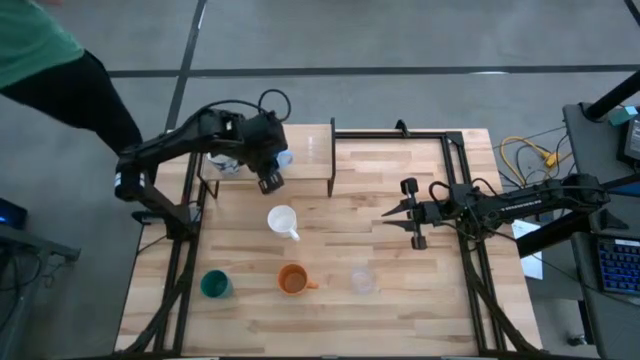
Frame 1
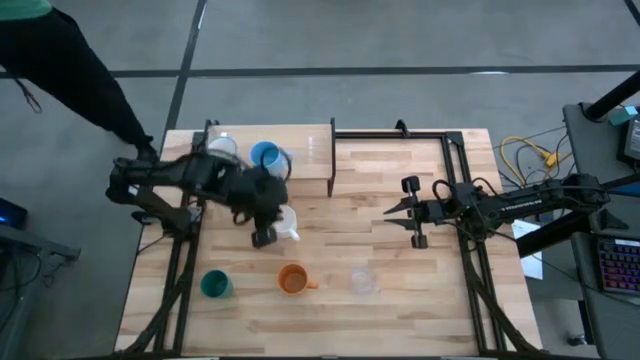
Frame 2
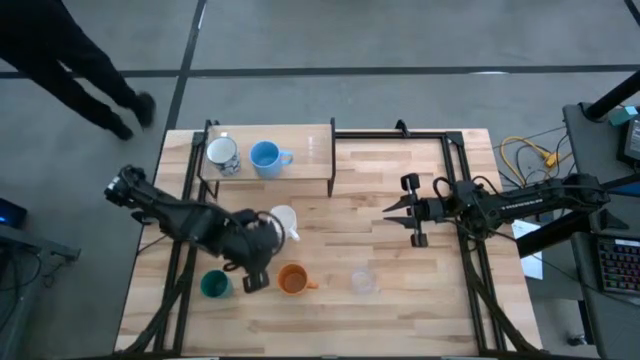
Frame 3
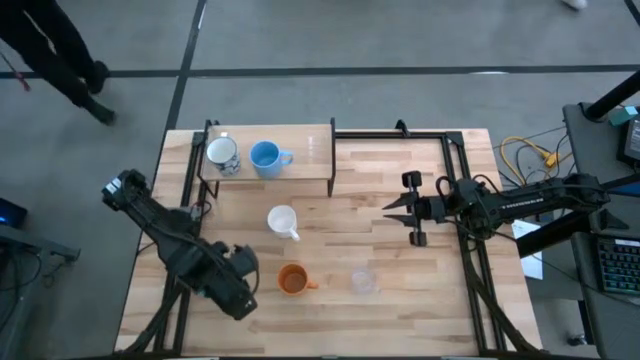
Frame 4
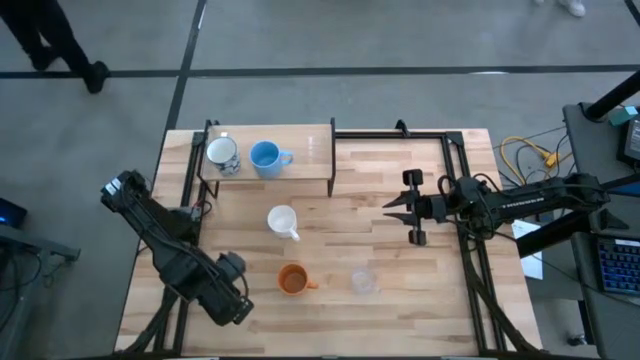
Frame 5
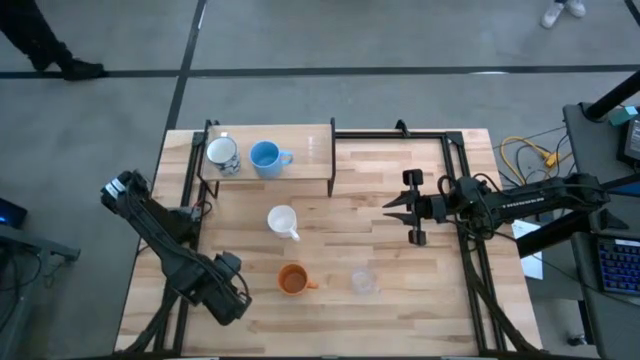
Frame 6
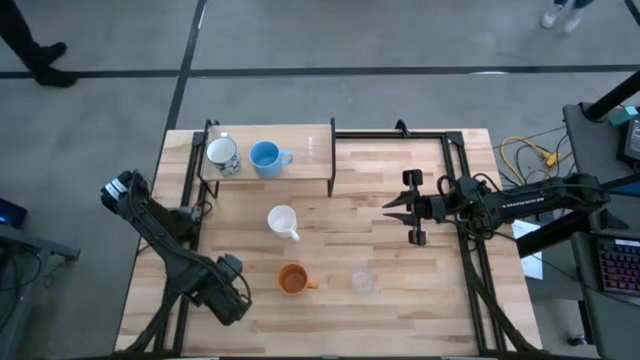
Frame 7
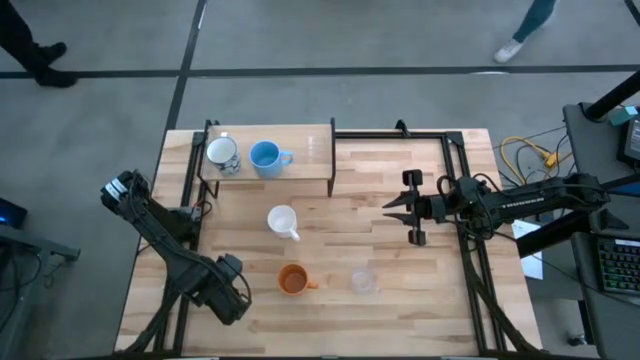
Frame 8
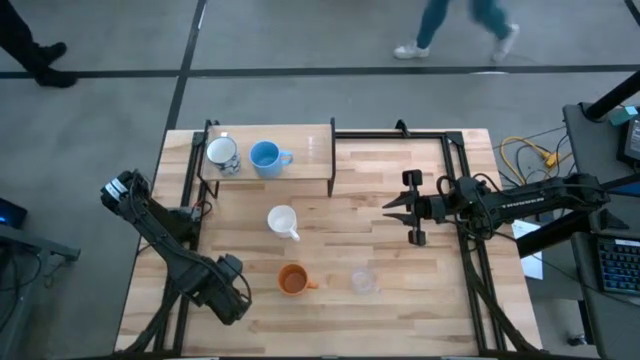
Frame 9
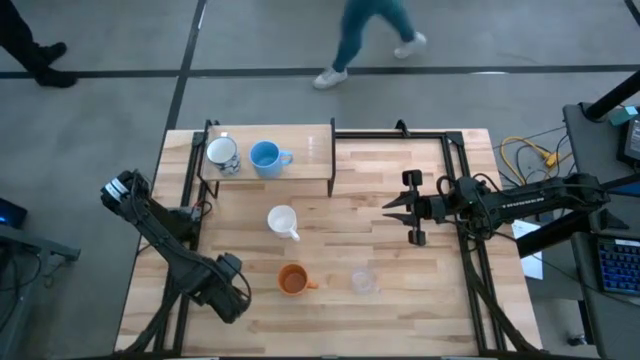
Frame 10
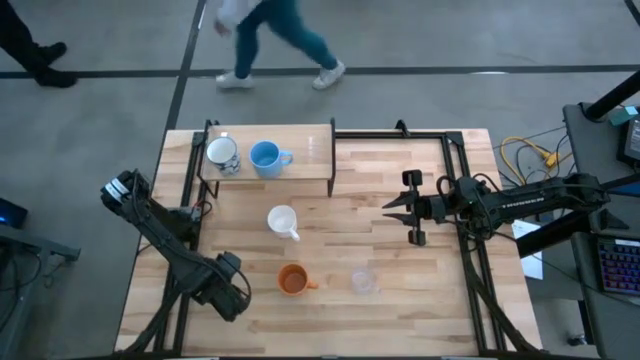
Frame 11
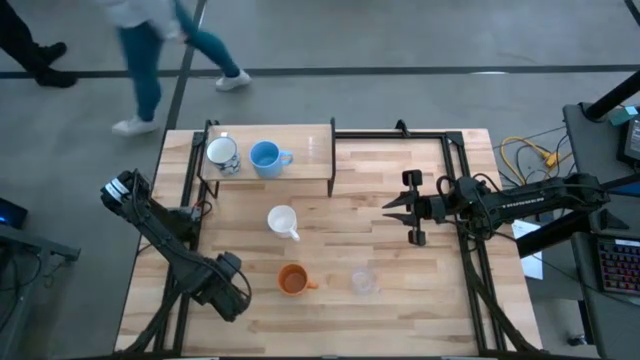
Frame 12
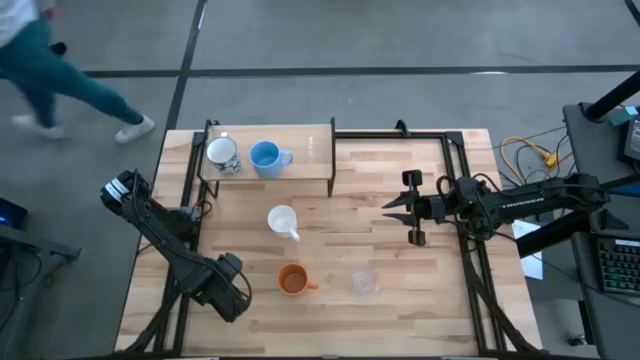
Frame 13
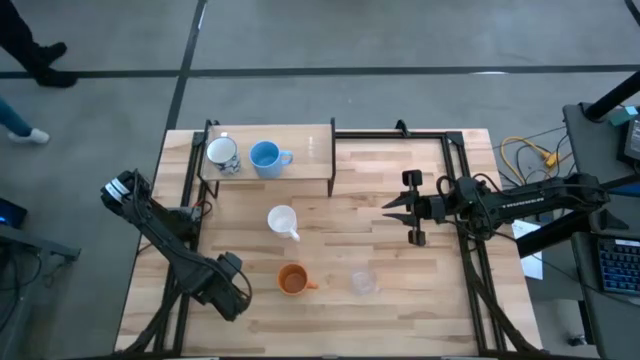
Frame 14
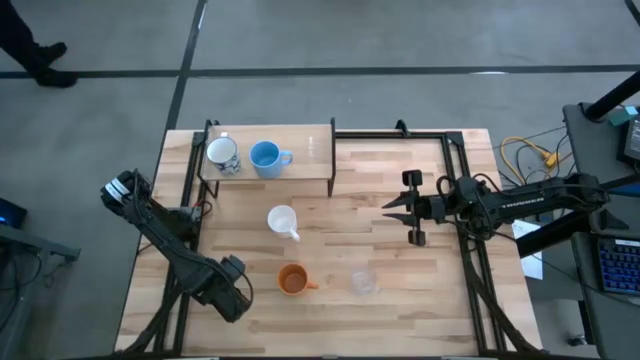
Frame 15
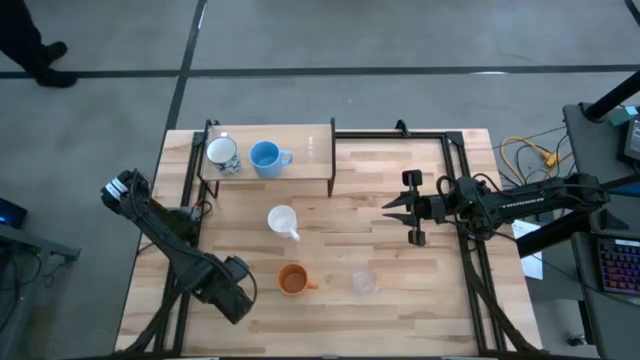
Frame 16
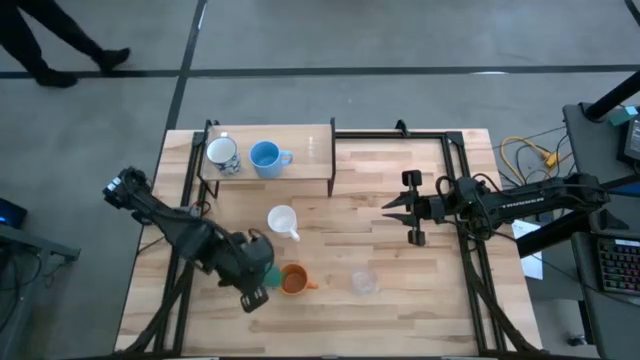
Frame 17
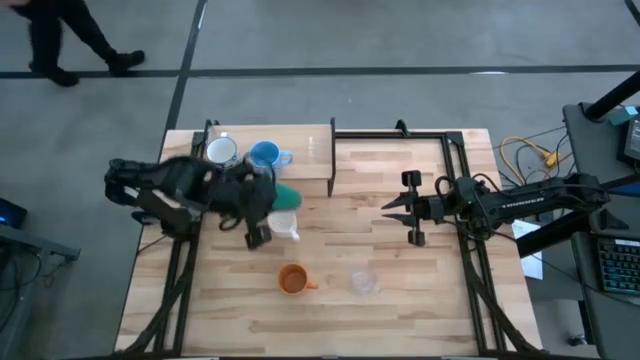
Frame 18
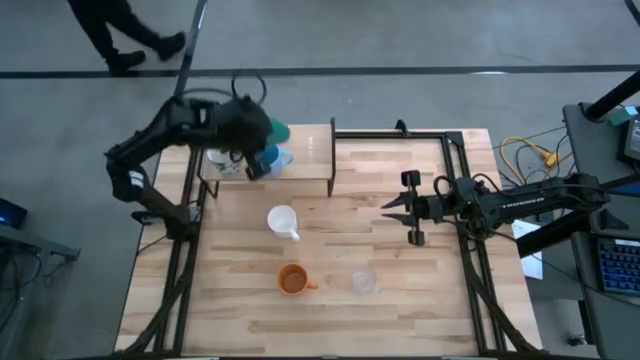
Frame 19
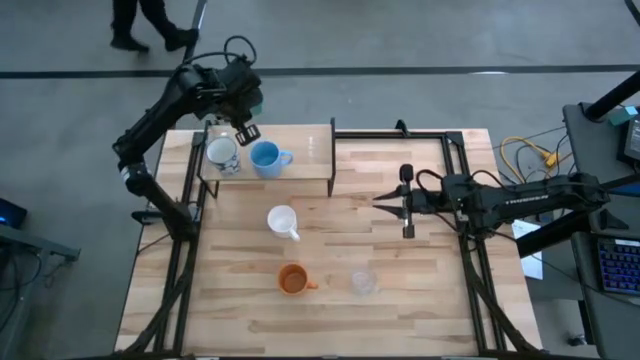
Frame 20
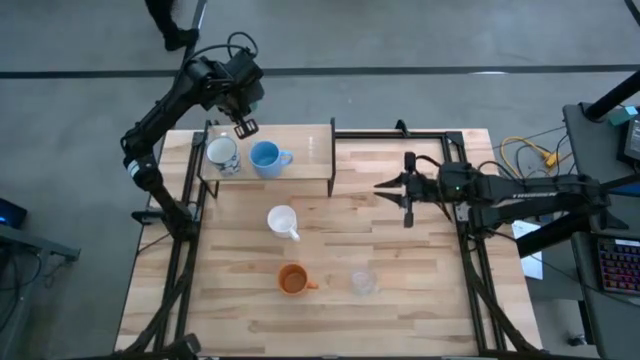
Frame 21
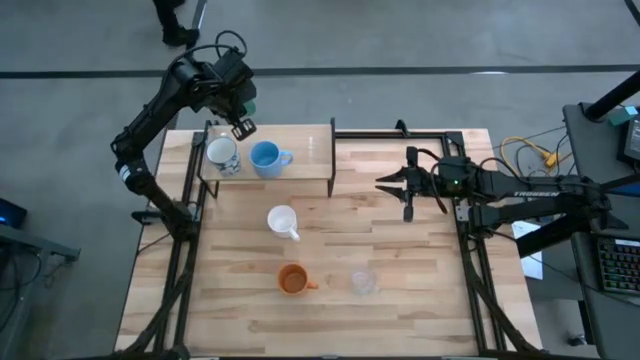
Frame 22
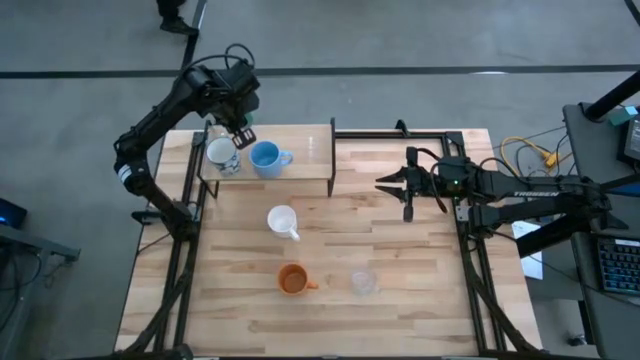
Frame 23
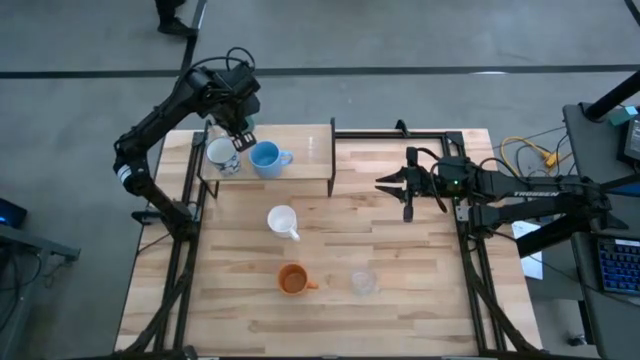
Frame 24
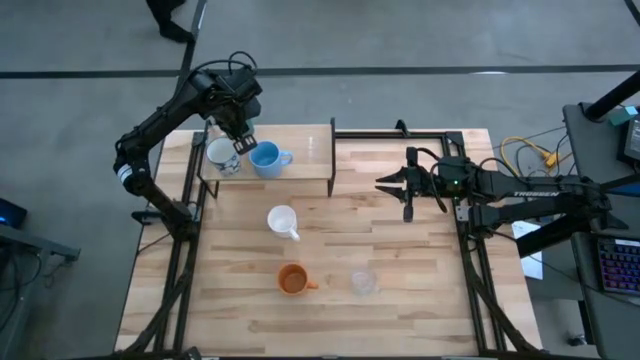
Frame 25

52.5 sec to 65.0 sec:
Task: Stack small to large cups/mugs on shelf
Put the green mug on the shelf

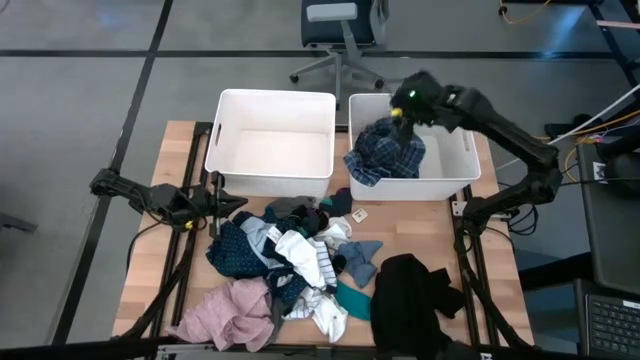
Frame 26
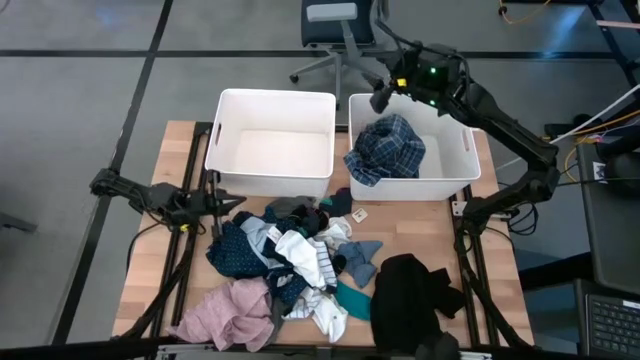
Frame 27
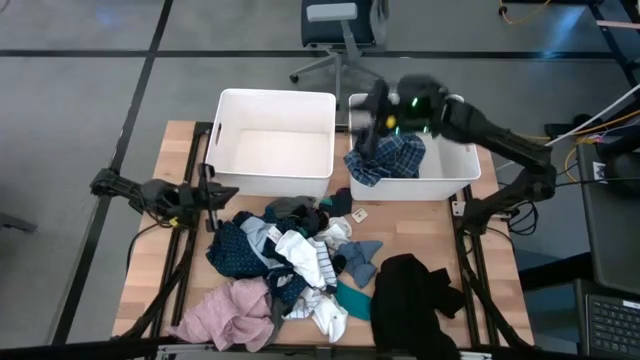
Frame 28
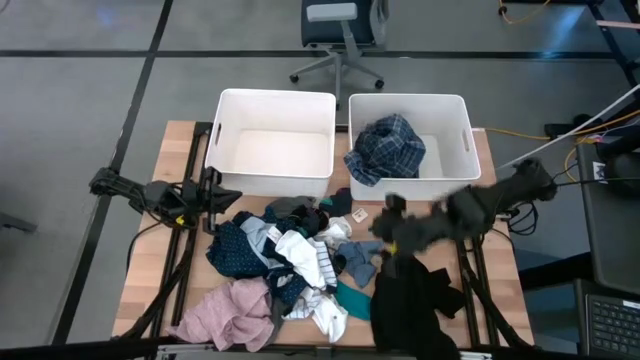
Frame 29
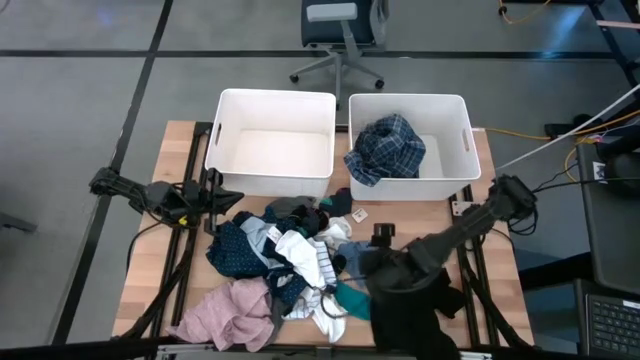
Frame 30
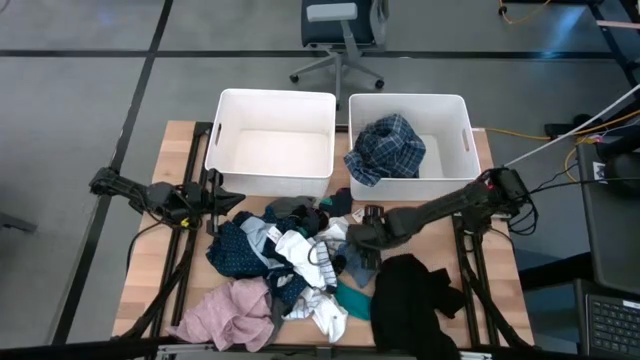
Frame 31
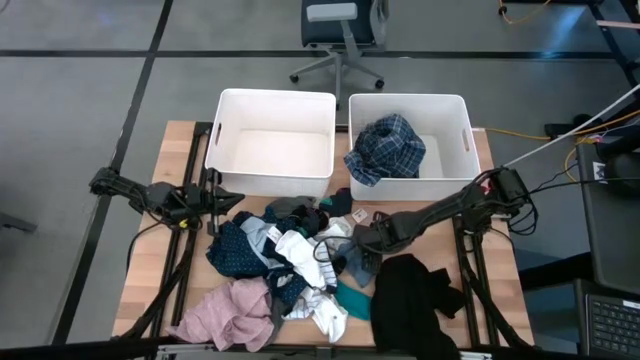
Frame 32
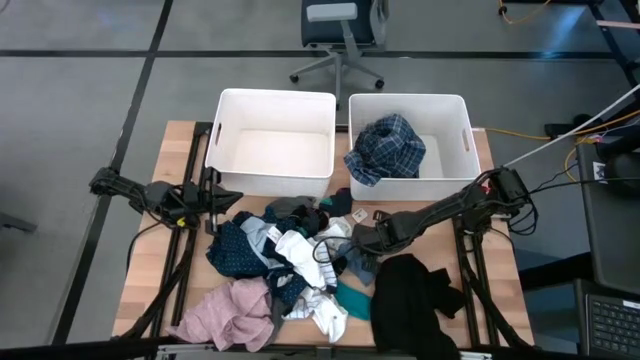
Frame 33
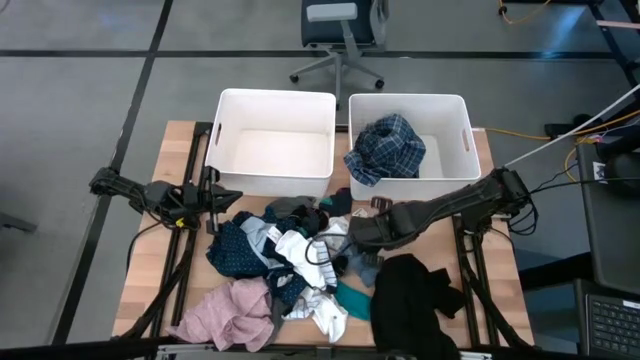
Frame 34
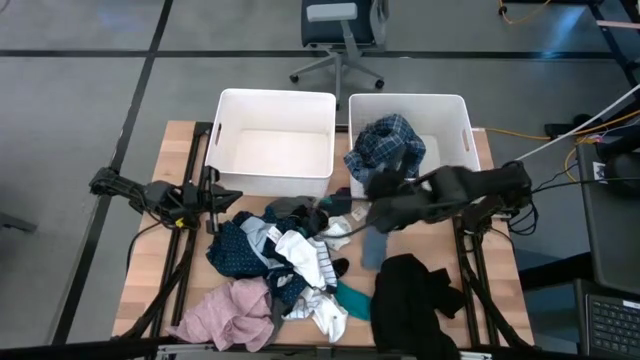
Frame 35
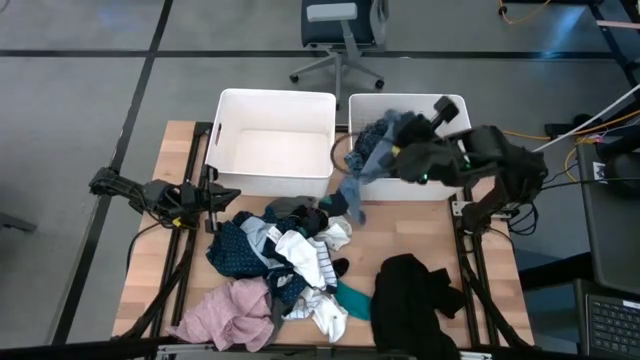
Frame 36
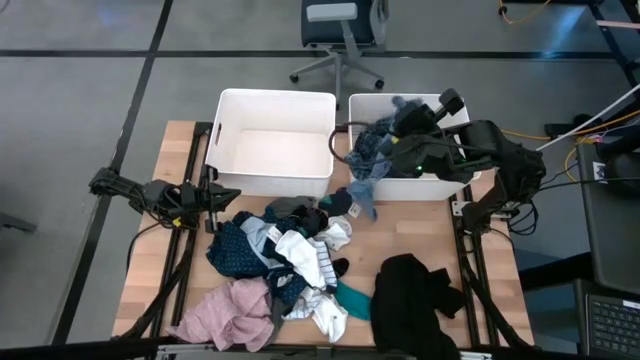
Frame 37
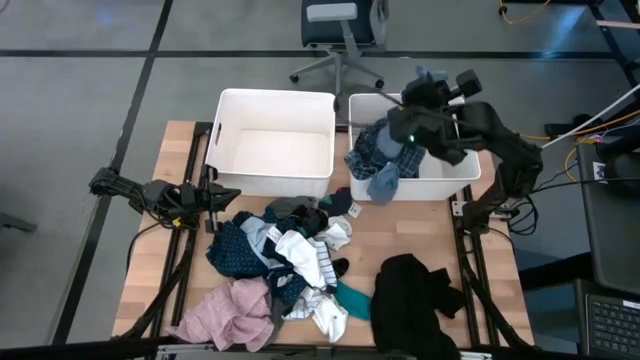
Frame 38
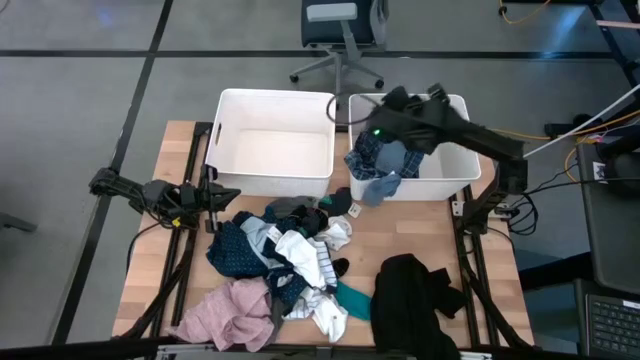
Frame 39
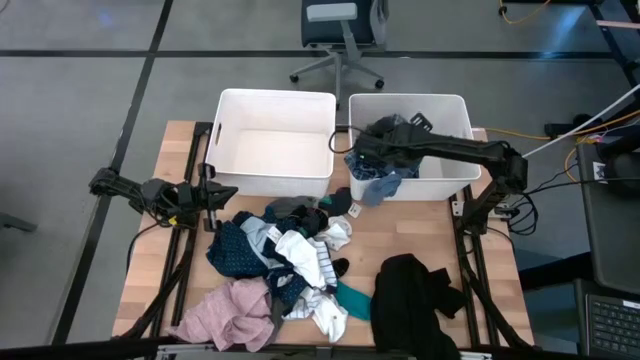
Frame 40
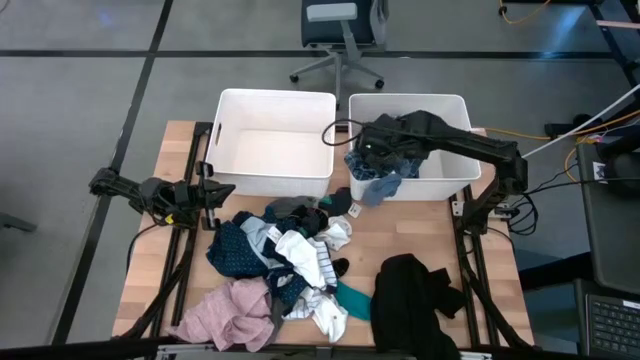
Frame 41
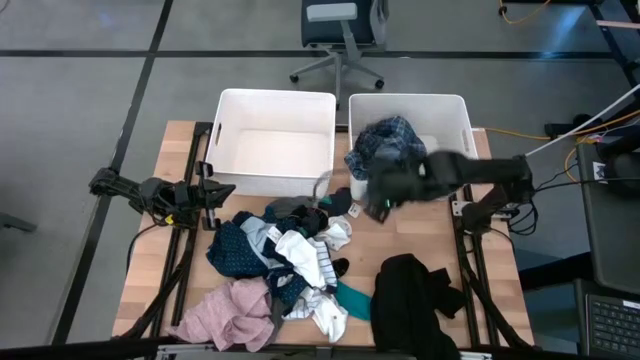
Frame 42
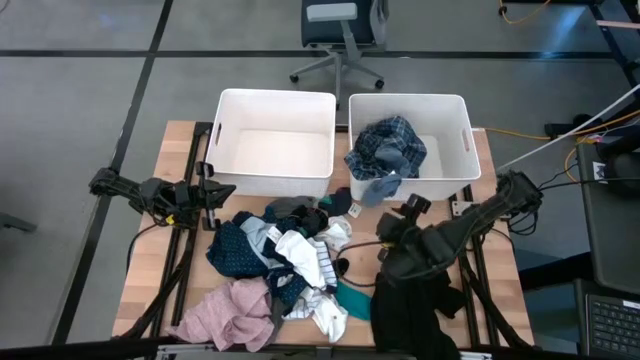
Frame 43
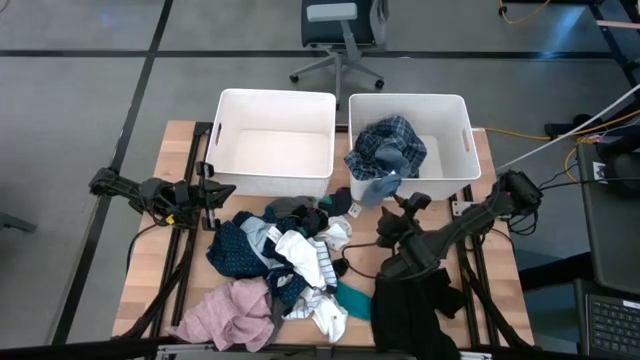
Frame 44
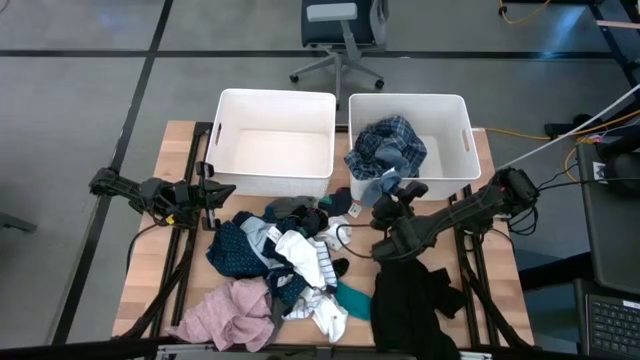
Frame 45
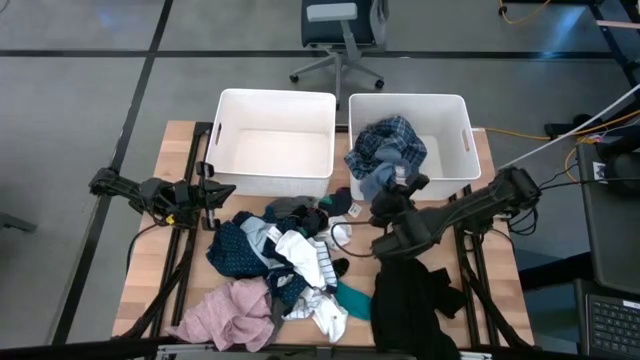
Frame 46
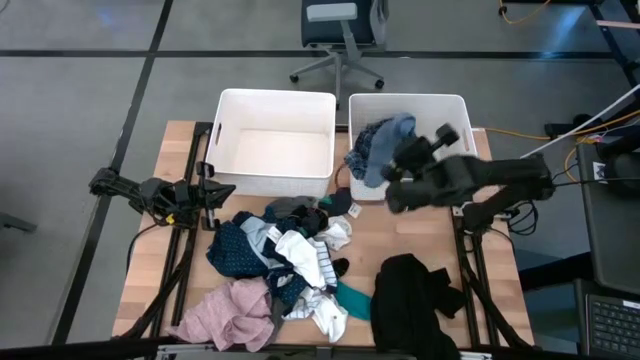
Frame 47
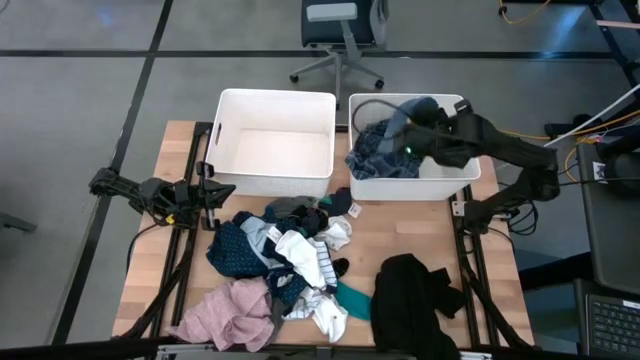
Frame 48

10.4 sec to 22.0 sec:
Task: Sort clothes
Put the blue socks into the right white bin
